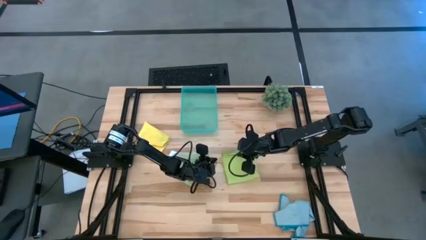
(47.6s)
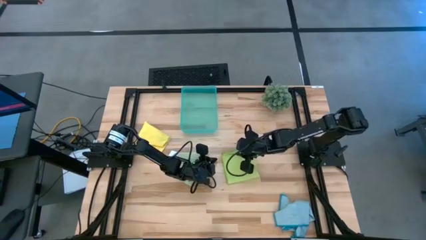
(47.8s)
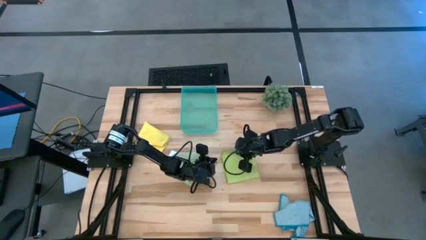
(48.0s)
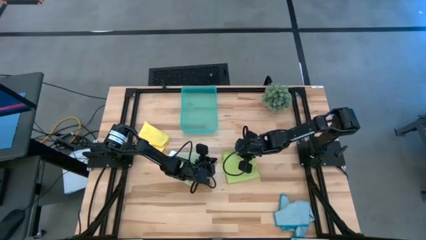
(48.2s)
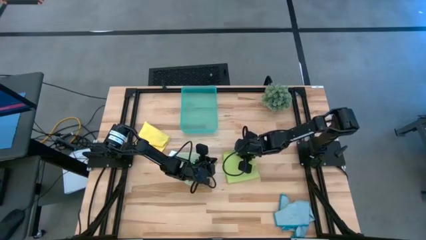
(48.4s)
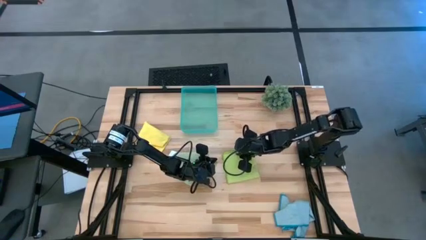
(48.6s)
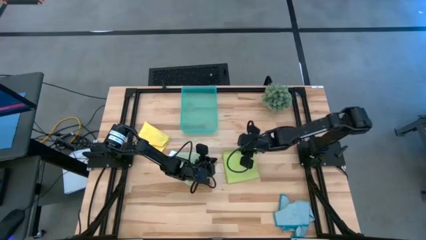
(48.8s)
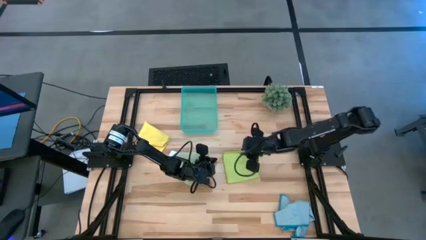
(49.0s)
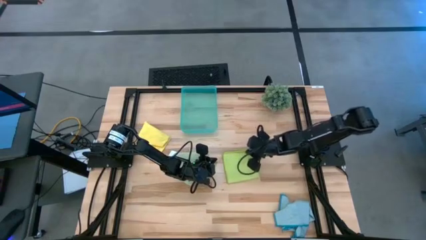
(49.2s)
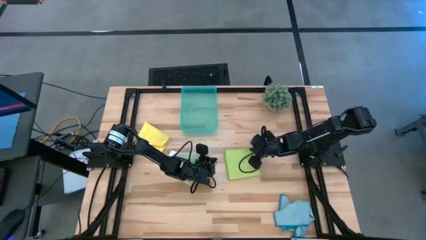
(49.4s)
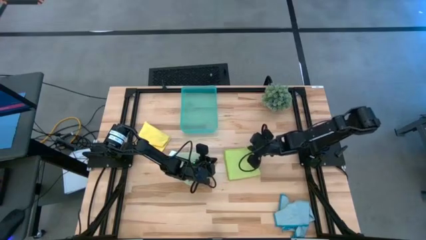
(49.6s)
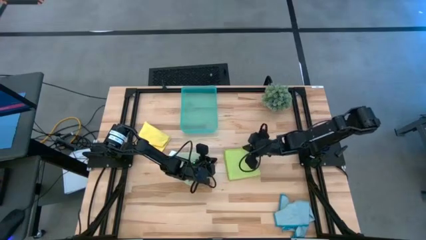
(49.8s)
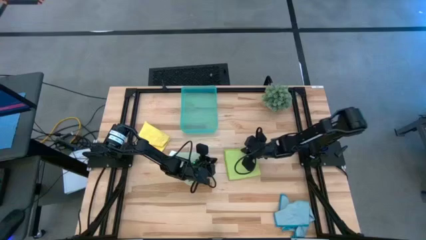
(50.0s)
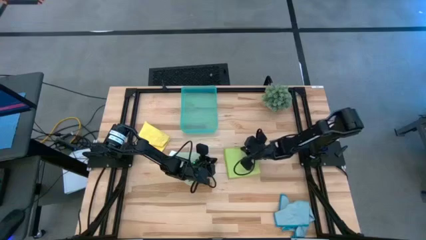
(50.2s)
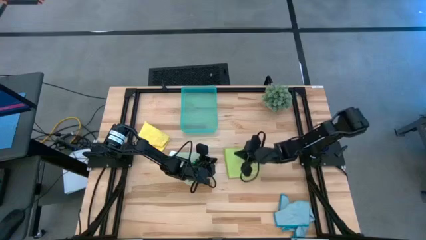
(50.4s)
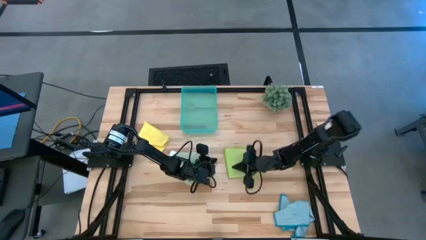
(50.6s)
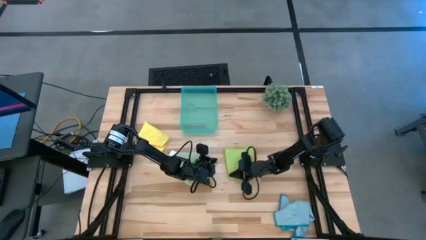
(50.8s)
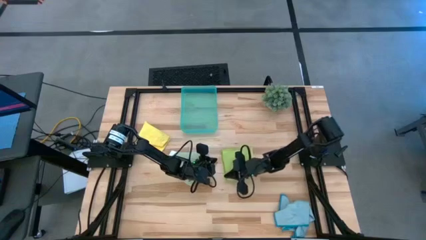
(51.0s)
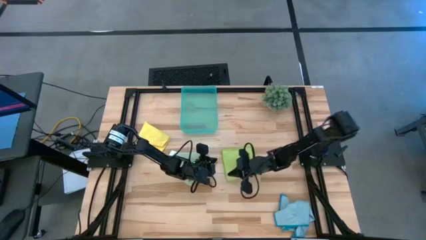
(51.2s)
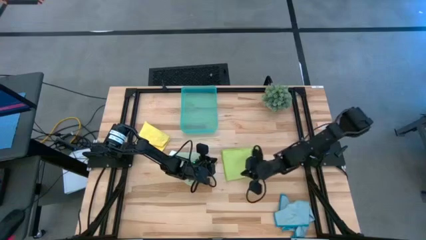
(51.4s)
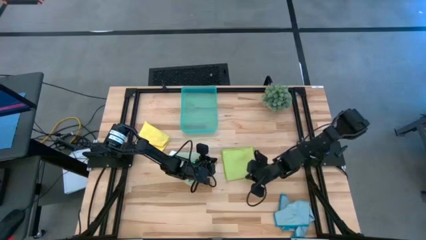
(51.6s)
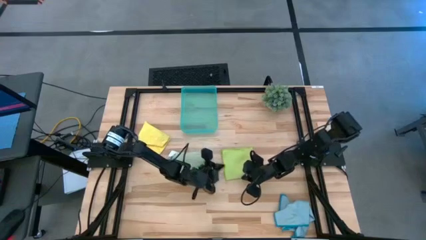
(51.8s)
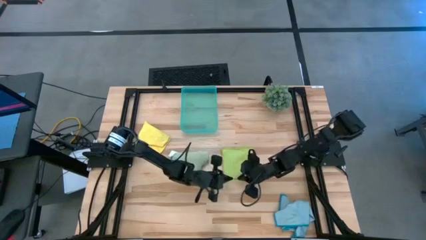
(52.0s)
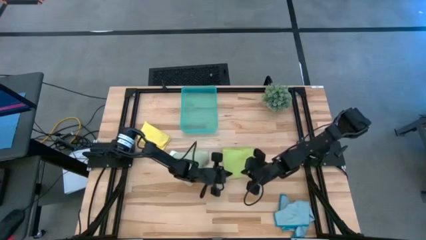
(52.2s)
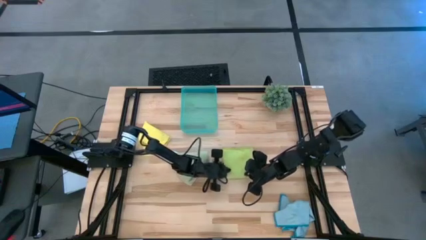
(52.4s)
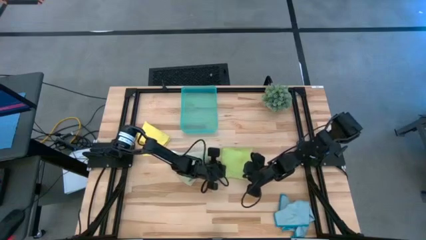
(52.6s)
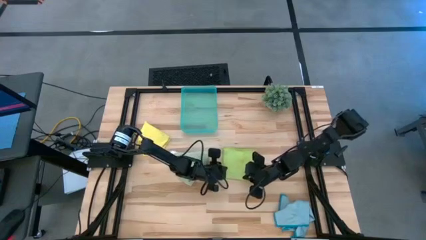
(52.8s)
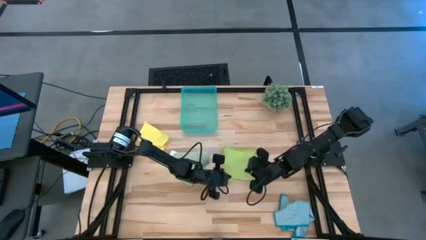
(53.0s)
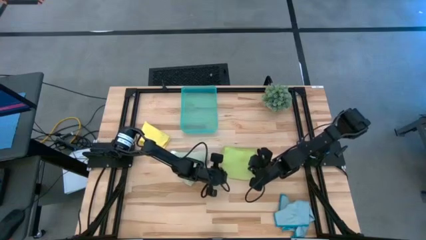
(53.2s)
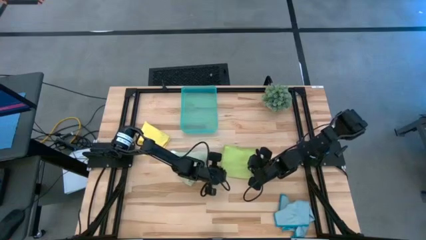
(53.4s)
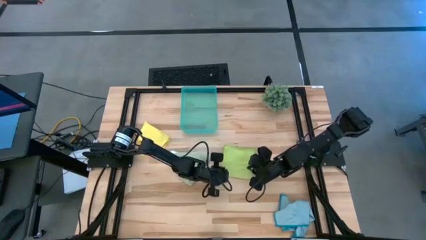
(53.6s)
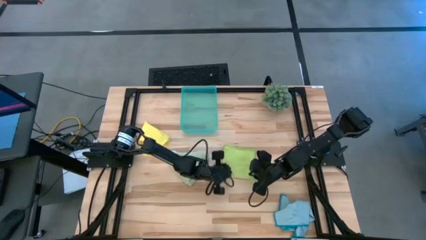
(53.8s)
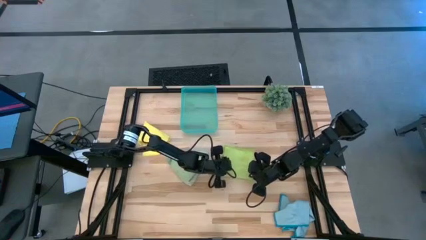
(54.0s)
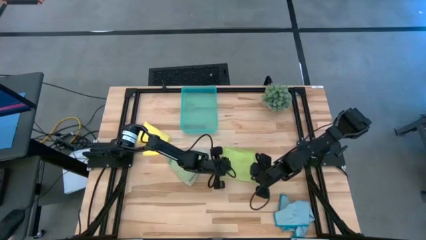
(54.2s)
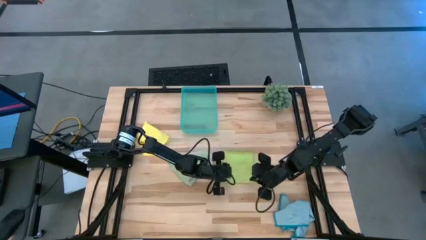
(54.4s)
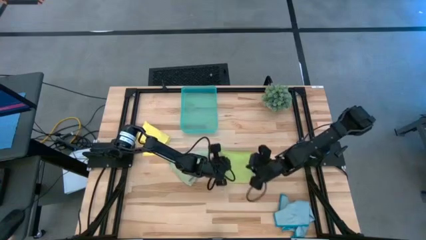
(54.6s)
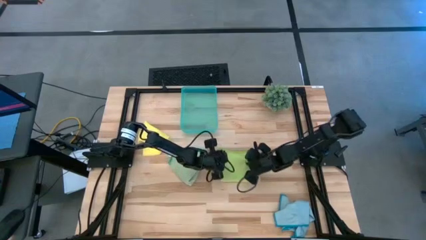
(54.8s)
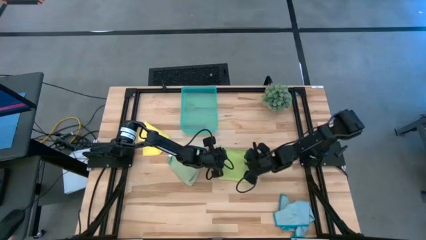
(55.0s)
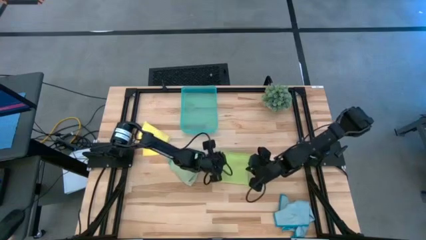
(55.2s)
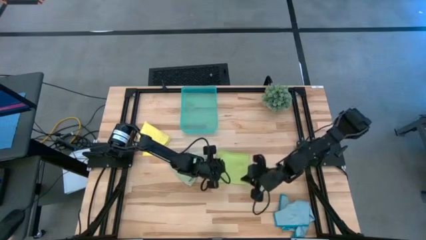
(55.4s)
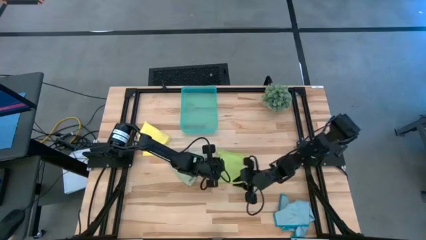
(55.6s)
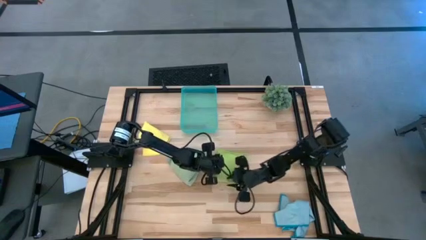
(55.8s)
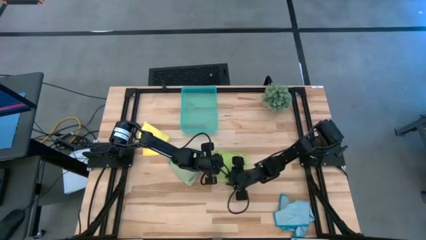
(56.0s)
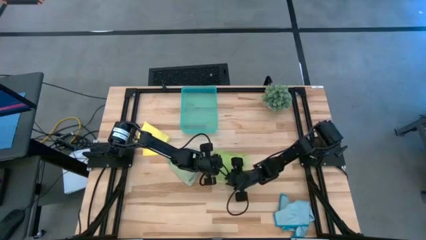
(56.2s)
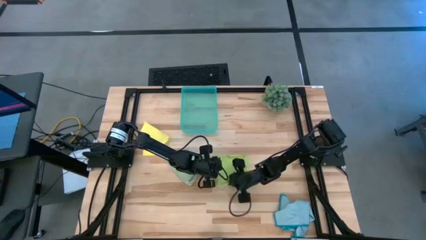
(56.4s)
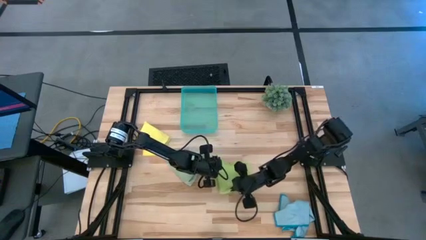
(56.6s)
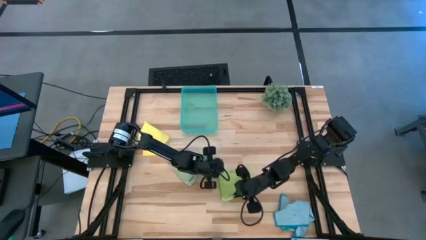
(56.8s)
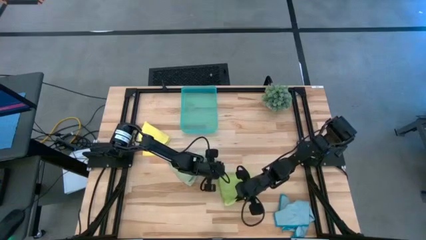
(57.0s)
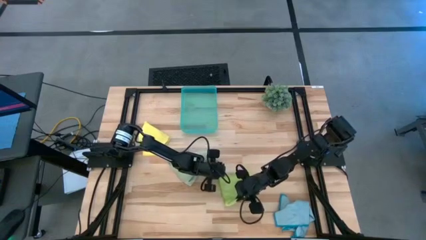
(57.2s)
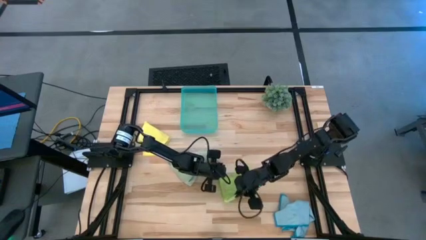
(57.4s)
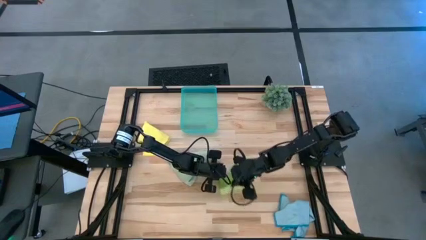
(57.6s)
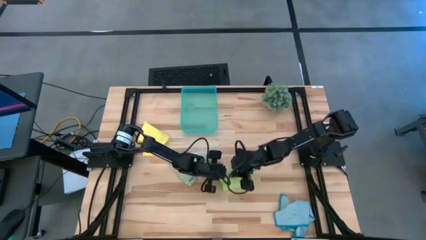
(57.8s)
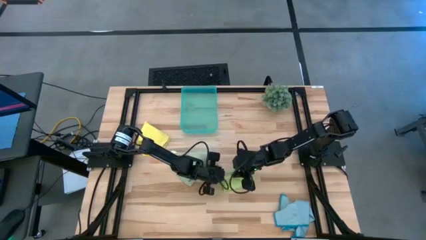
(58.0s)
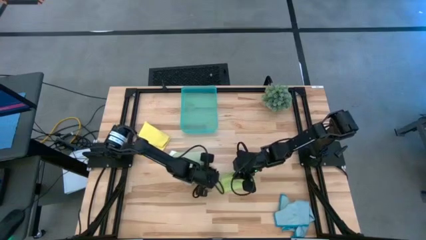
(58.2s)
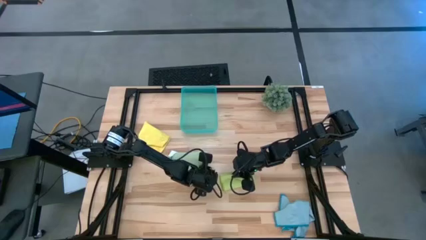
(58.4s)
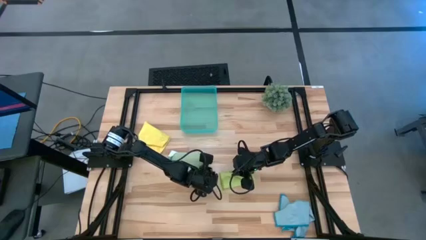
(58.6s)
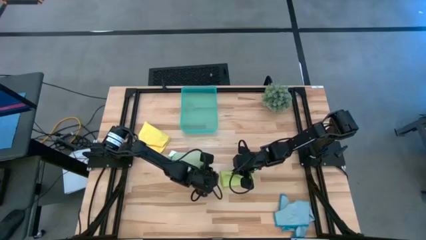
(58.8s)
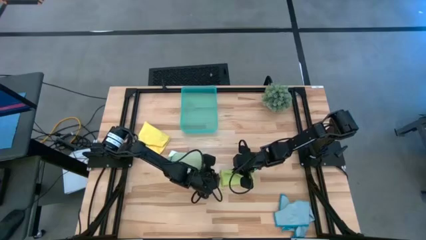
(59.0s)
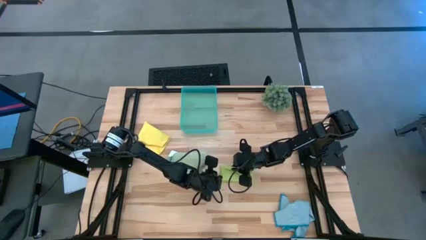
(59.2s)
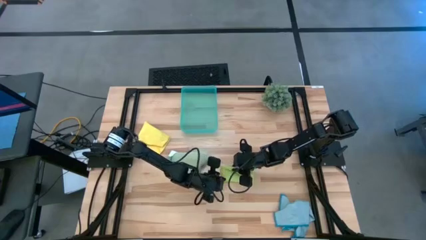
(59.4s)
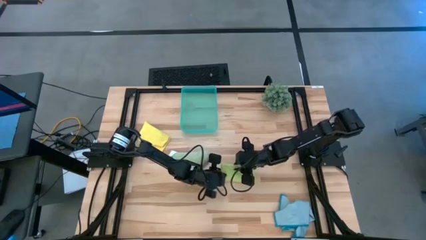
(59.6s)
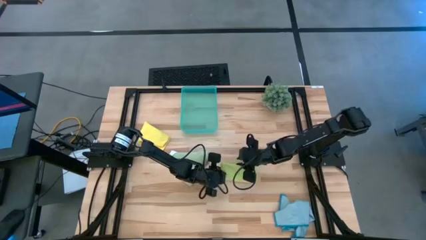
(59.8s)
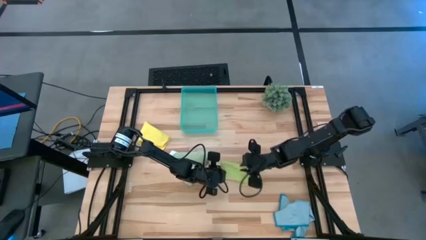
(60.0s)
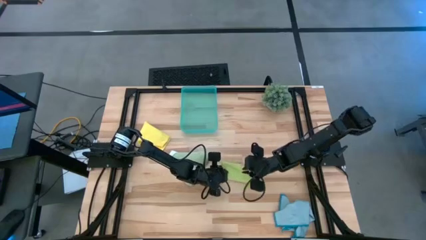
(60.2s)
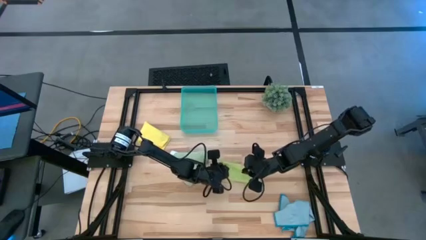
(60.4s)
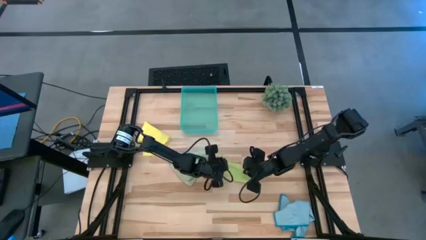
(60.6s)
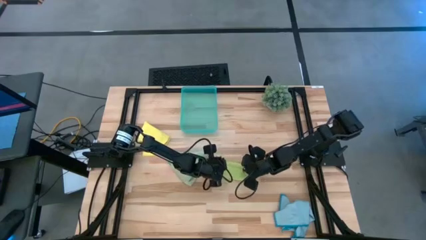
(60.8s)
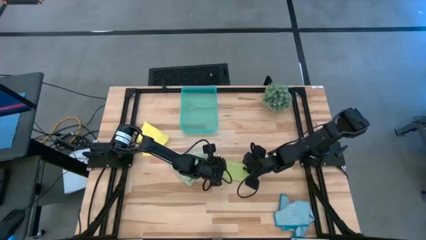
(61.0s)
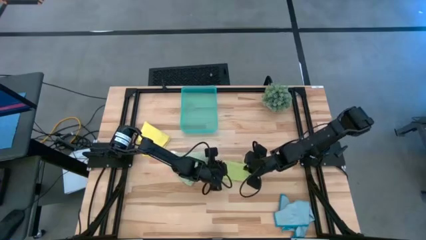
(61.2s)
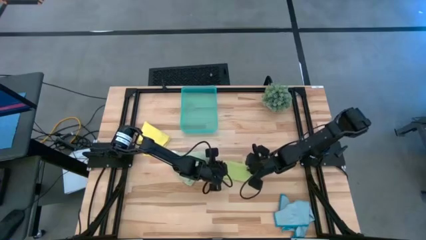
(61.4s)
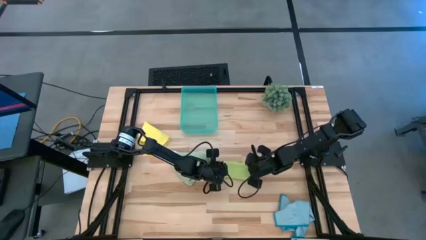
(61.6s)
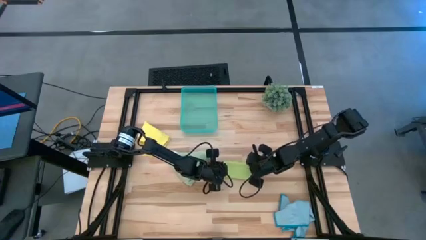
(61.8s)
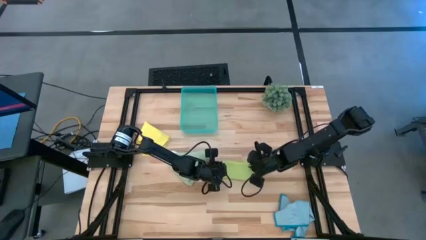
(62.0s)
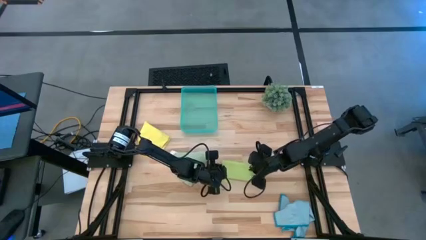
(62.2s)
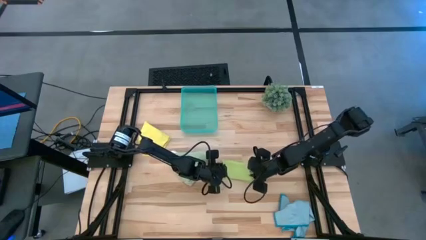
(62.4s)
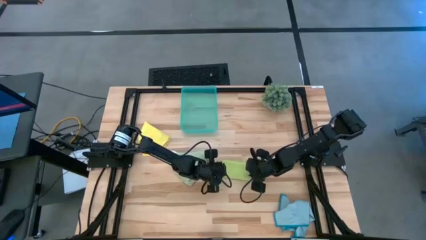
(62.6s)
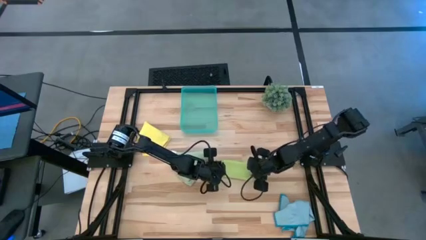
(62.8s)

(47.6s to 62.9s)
Task: Fold microfiber towels
Fold the light green microfiber cloth
